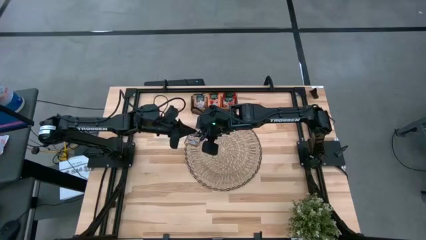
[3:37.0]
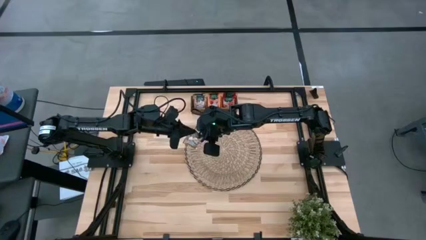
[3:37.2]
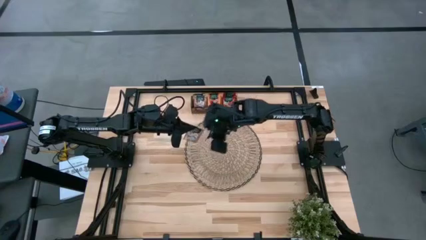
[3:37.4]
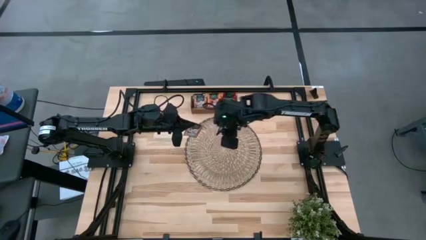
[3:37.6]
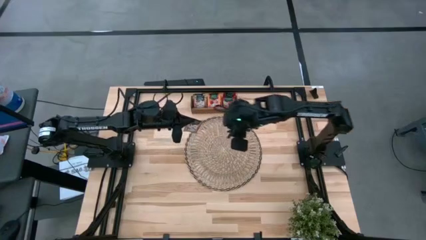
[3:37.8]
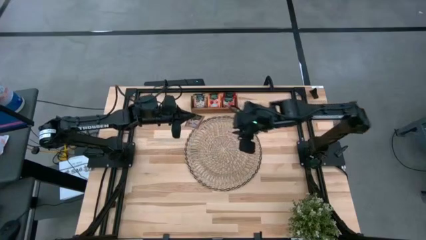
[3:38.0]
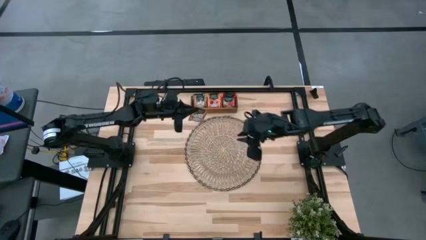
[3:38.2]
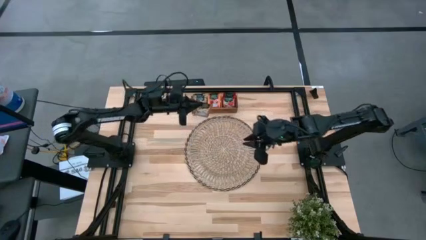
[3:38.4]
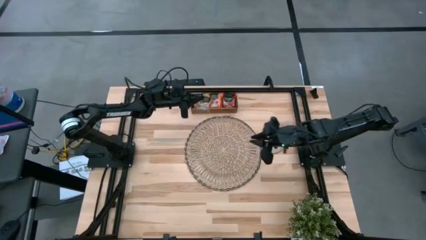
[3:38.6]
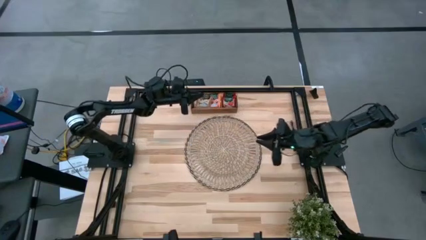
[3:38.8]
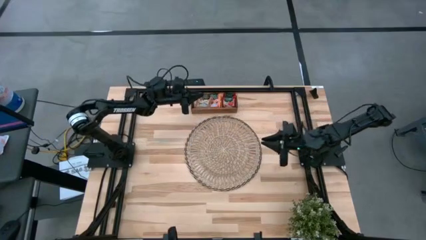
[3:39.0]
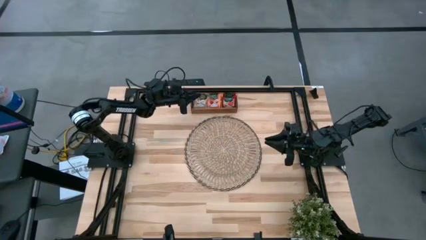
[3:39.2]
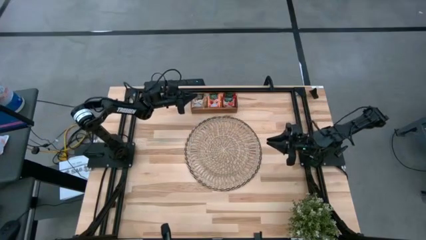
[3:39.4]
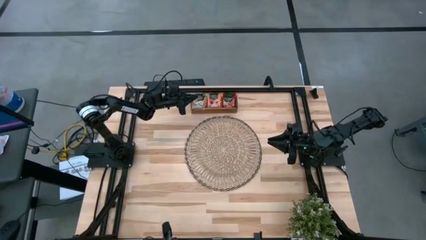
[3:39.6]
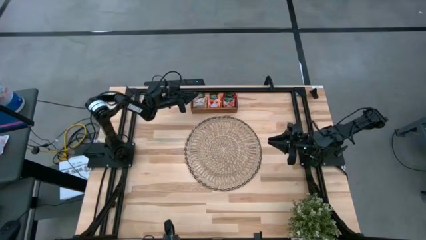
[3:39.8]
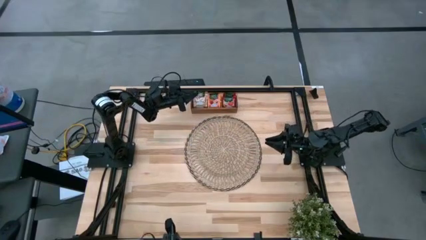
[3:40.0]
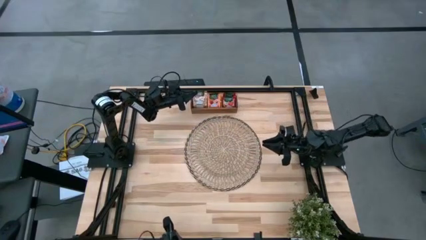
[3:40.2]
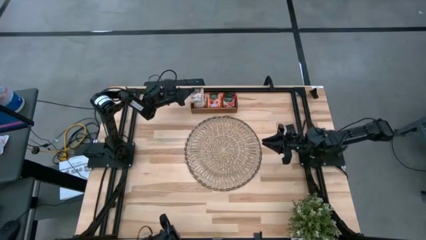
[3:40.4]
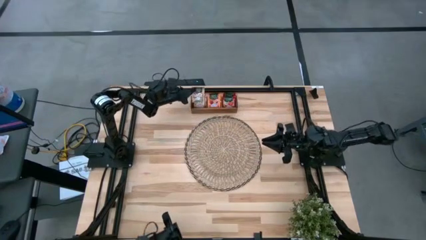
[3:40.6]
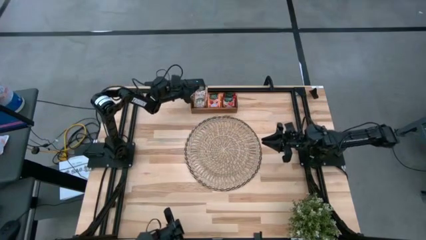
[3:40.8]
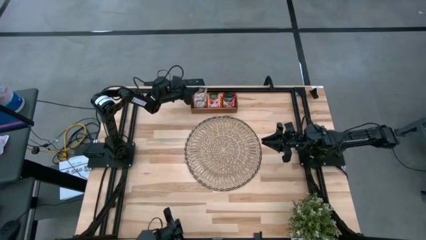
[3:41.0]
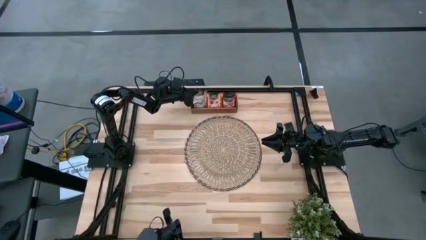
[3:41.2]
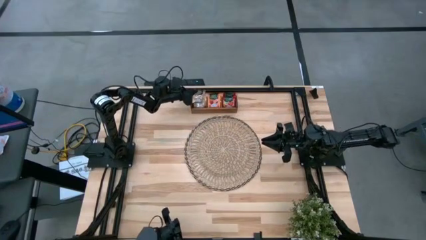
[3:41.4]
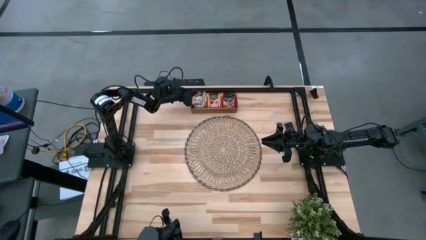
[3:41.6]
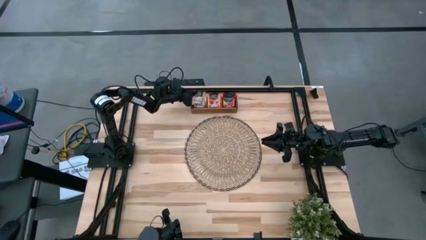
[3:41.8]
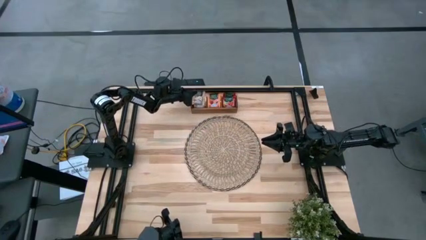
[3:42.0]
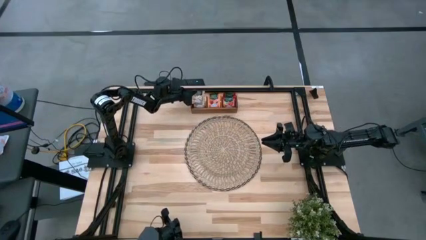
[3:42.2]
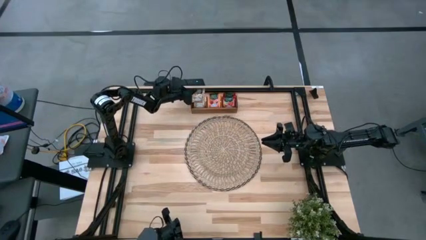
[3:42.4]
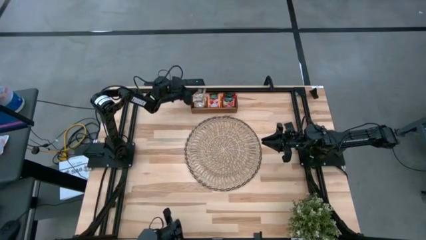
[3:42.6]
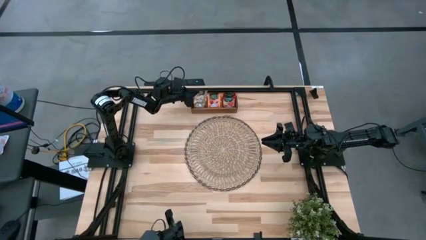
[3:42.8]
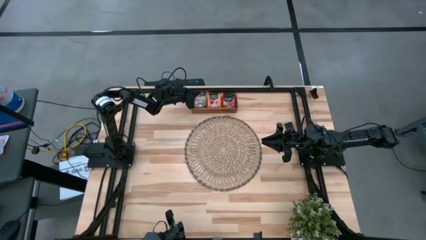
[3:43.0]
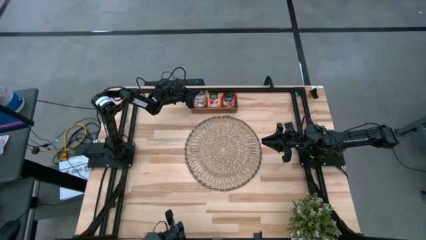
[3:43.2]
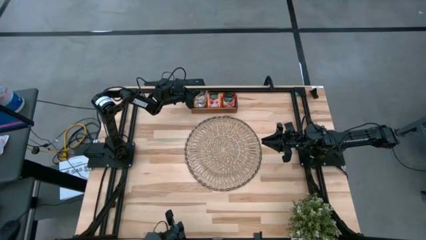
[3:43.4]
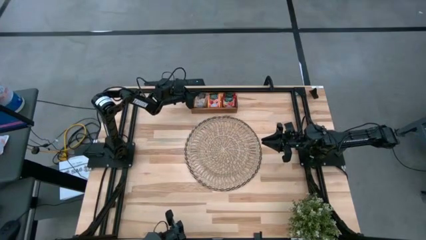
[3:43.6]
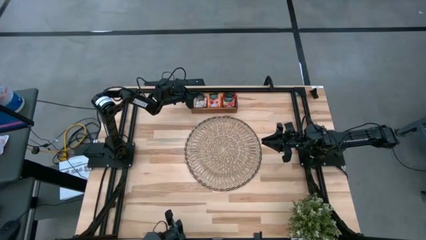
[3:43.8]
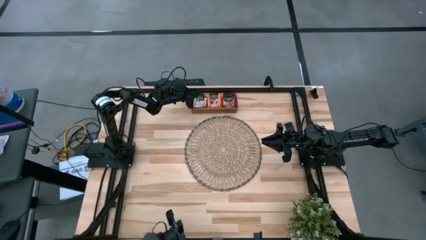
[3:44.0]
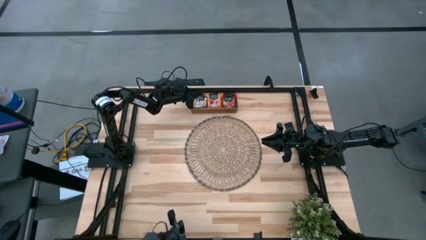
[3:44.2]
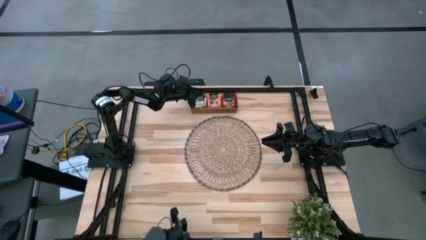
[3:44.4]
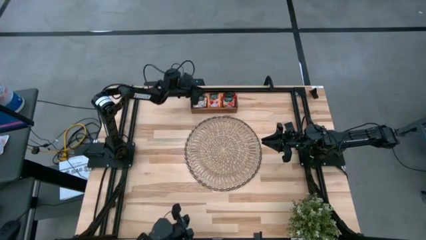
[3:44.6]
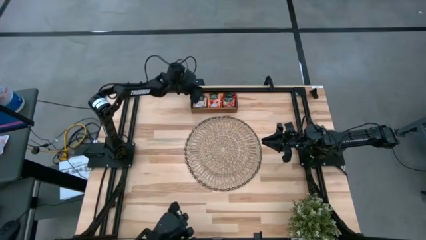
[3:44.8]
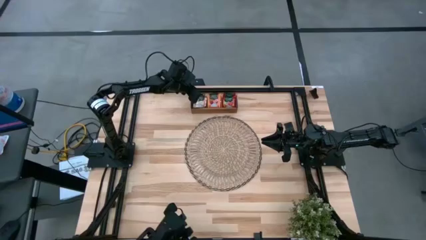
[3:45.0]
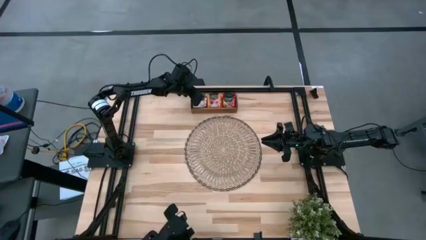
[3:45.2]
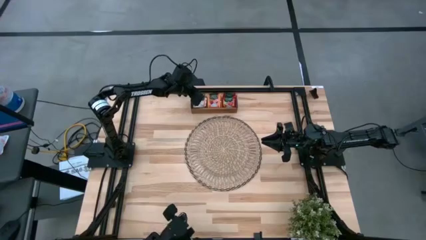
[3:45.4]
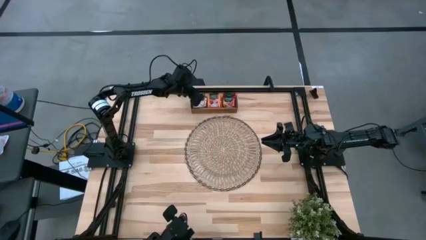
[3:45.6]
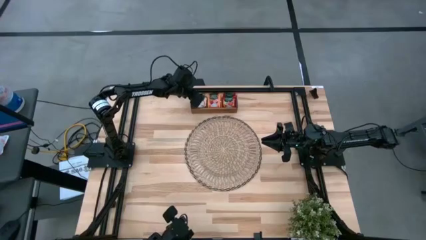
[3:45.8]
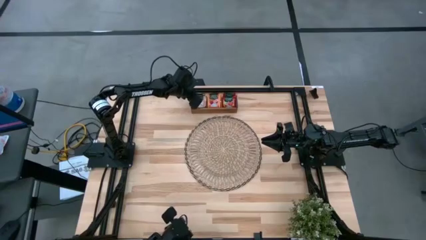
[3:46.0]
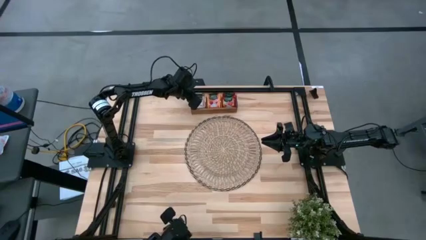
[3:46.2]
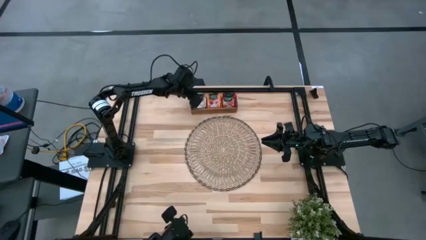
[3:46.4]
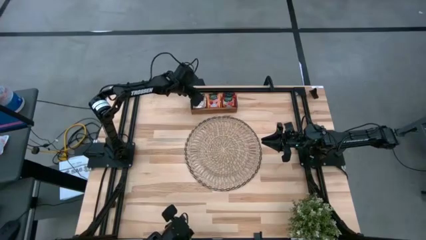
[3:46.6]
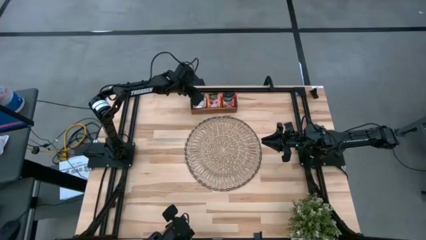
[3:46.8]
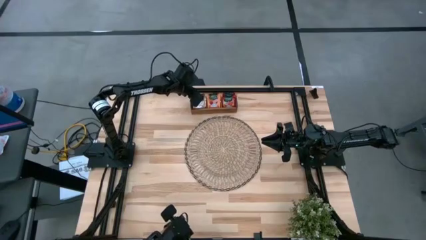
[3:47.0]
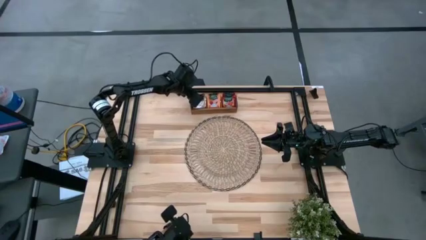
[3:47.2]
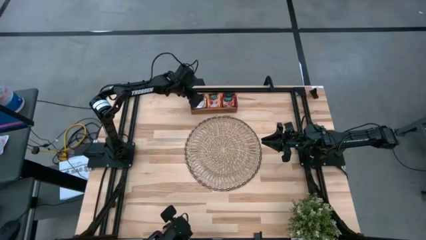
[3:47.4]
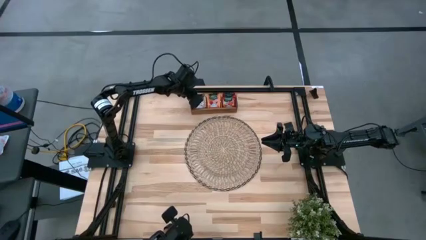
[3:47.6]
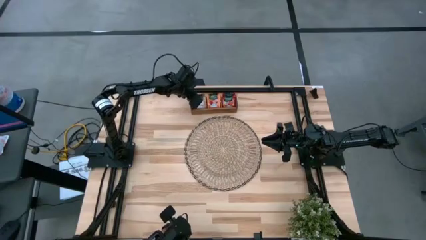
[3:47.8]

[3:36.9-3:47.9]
Task: Pick & Place Tea
Put the brown tea bag into the left section of the wooden organizer

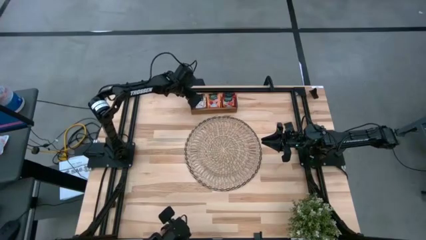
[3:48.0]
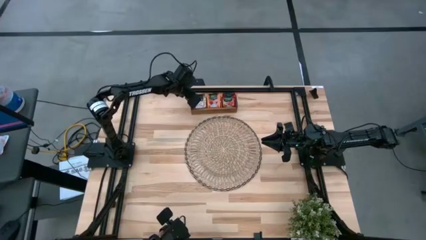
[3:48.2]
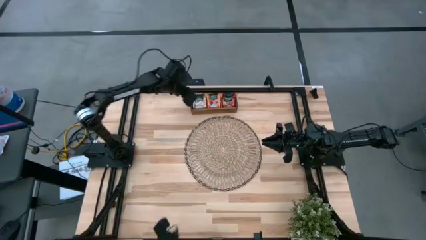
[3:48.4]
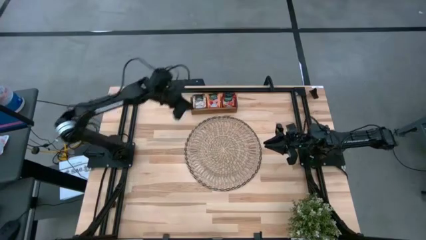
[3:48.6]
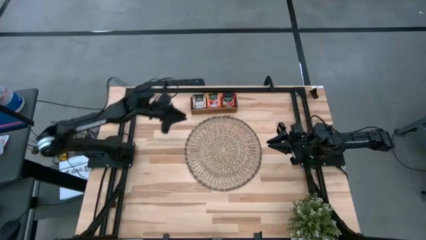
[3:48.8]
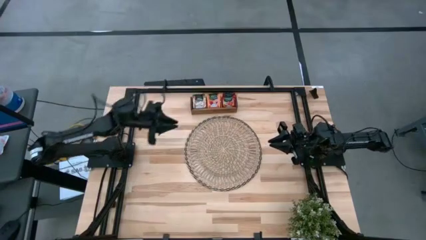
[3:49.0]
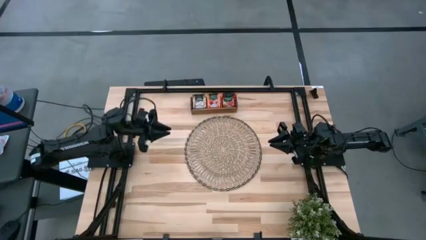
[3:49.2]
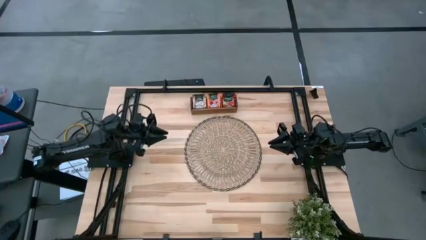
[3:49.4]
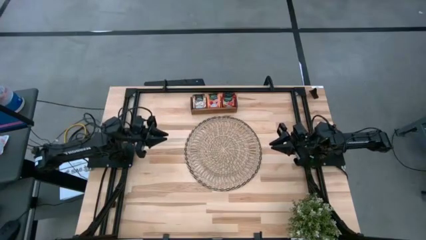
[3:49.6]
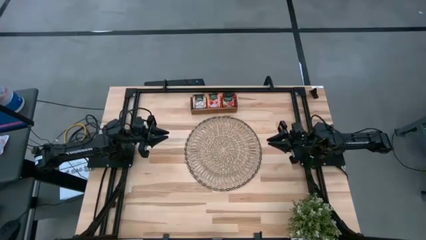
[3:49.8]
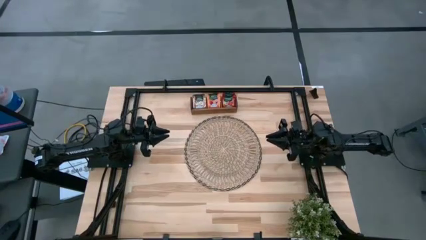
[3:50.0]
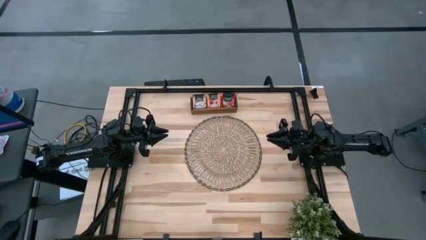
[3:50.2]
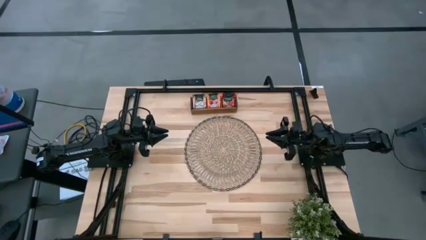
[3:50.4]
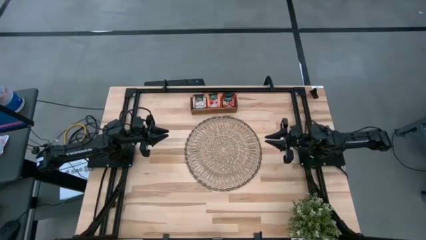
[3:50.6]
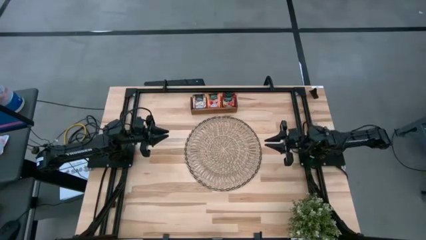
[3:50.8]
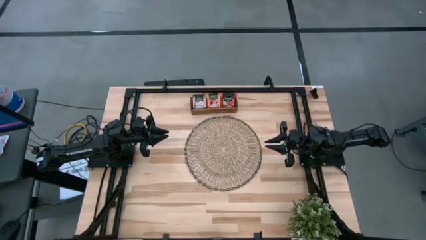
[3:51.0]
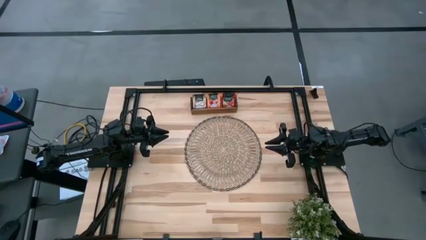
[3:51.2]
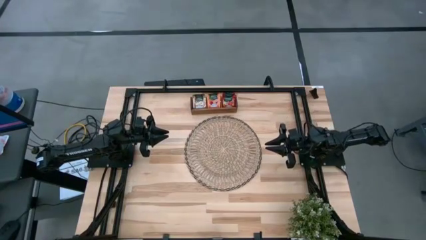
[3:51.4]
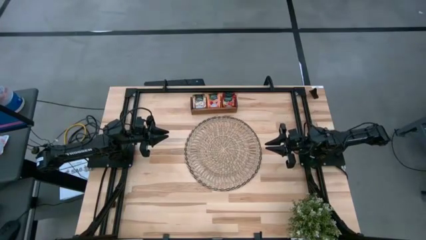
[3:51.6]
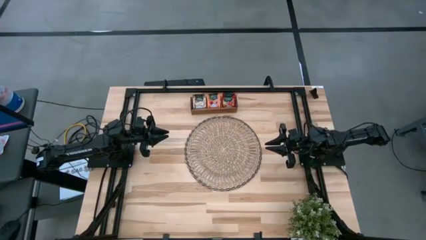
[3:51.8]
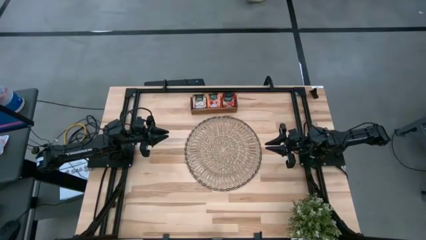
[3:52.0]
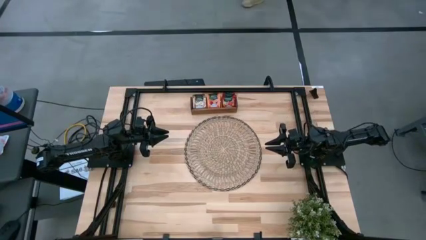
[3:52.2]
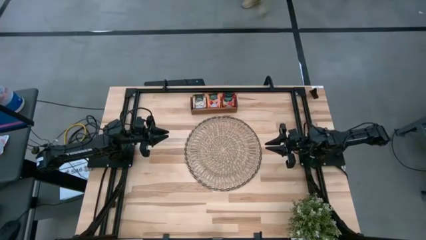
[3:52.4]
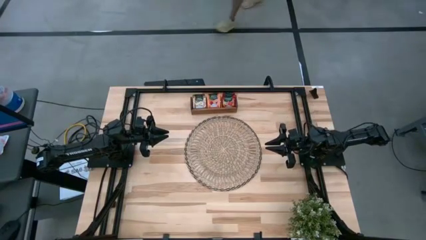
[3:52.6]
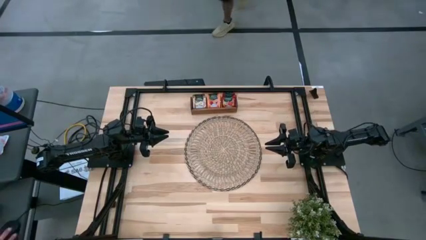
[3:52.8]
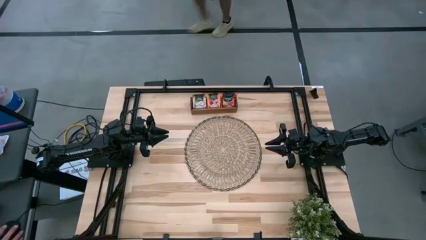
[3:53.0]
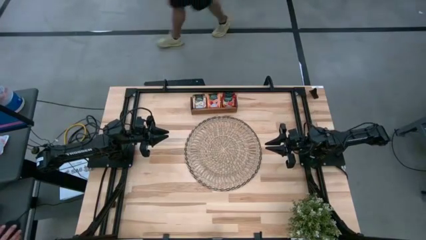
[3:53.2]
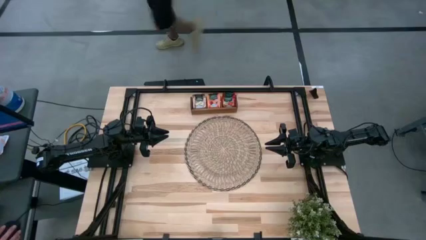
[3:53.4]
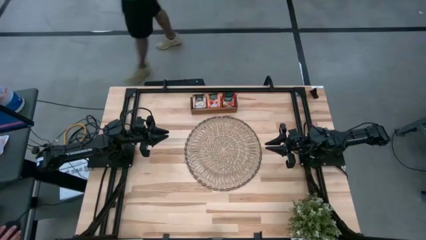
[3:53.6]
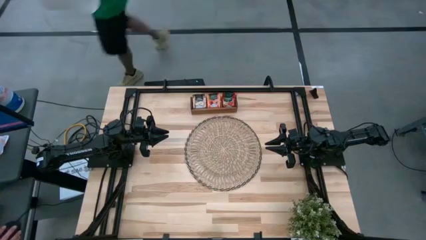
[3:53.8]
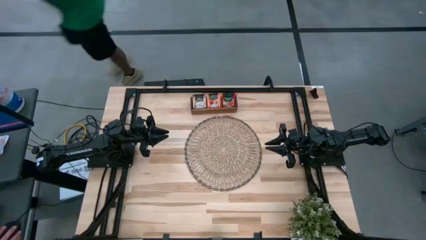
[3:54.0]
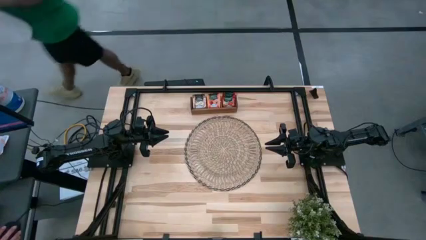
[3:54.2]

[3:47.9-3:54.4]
Return to Home Position
